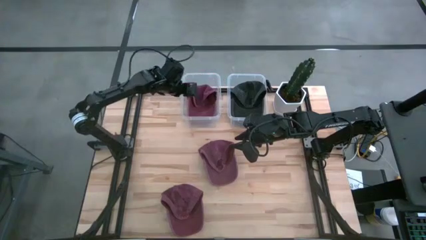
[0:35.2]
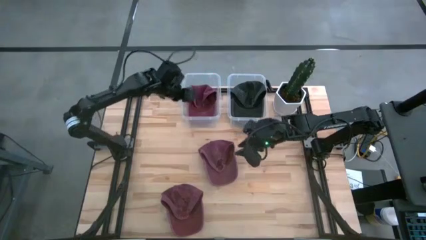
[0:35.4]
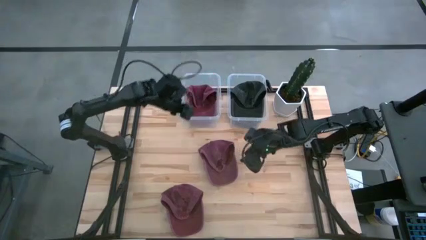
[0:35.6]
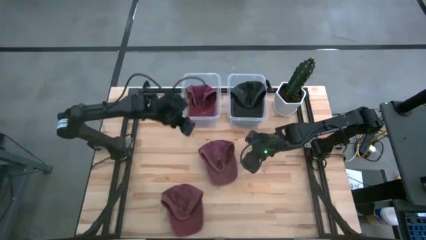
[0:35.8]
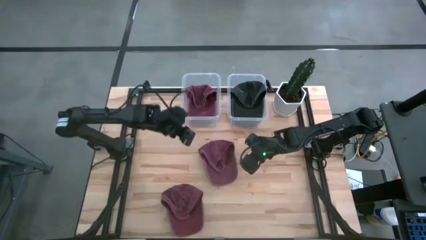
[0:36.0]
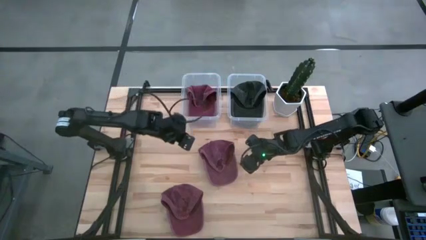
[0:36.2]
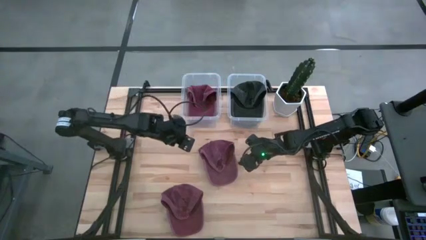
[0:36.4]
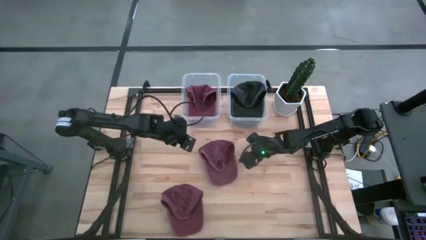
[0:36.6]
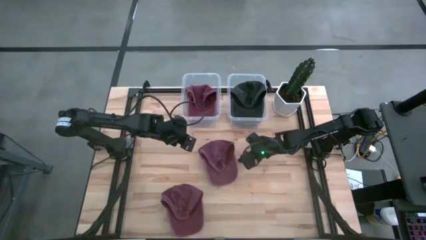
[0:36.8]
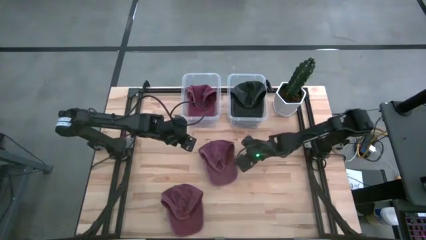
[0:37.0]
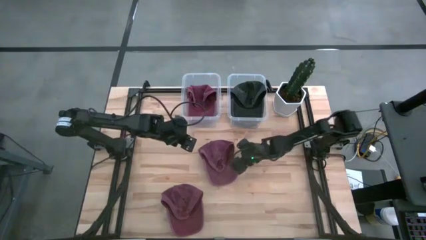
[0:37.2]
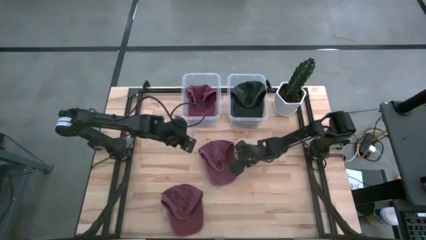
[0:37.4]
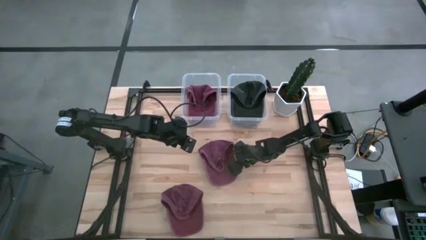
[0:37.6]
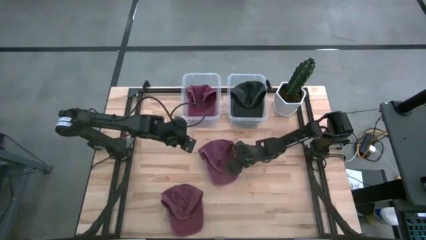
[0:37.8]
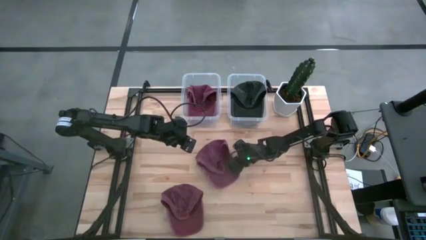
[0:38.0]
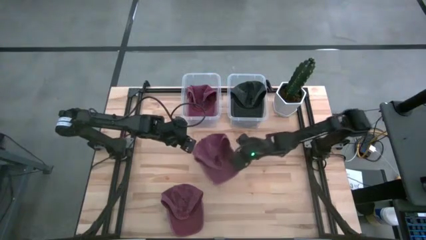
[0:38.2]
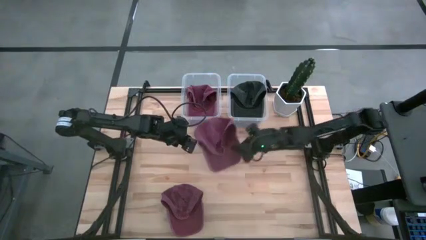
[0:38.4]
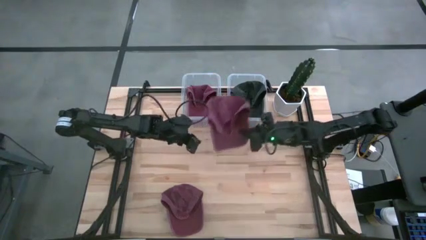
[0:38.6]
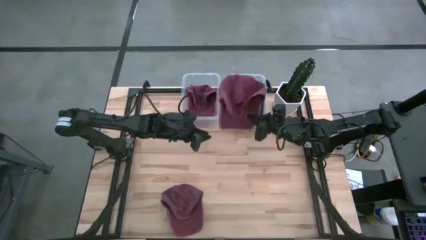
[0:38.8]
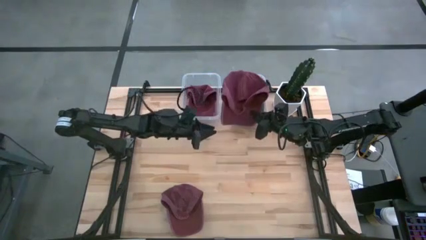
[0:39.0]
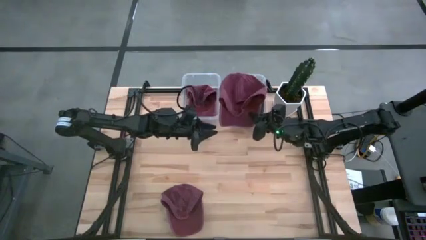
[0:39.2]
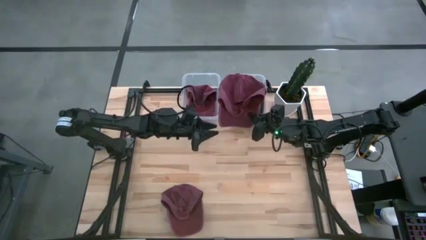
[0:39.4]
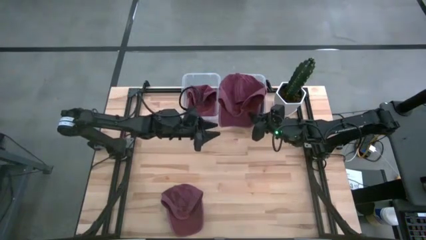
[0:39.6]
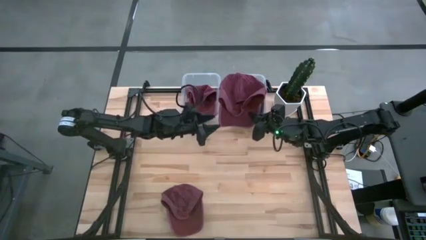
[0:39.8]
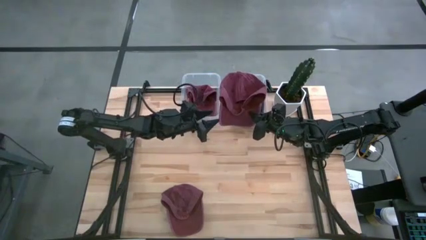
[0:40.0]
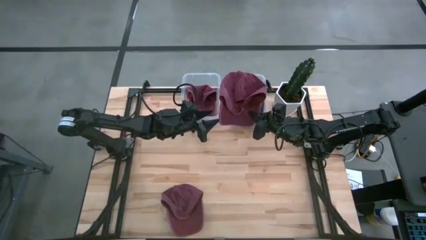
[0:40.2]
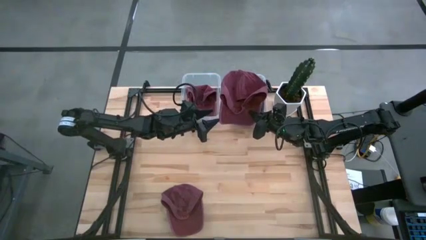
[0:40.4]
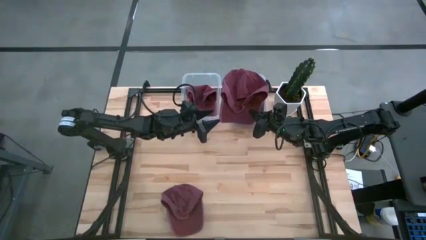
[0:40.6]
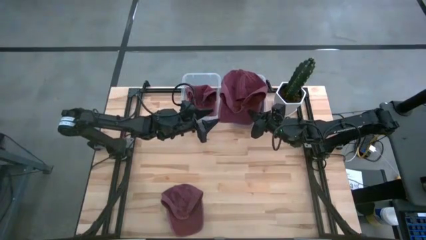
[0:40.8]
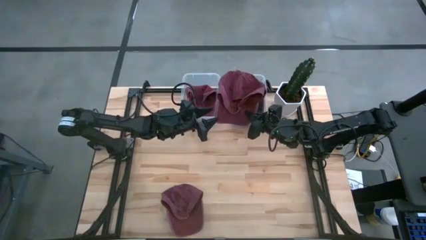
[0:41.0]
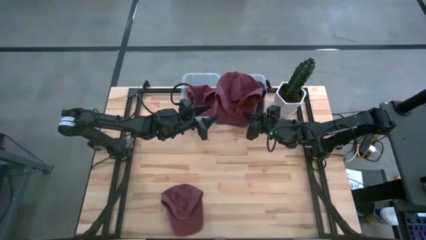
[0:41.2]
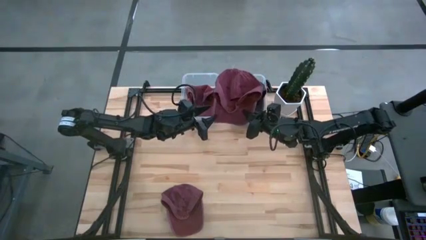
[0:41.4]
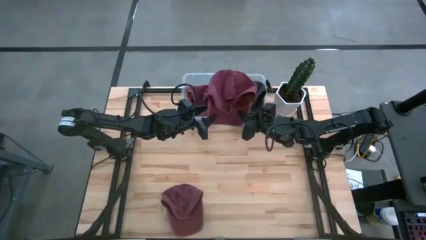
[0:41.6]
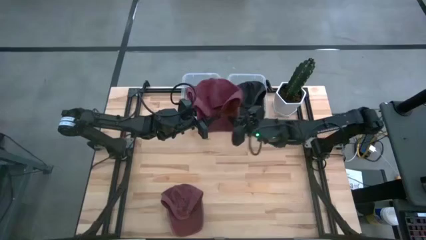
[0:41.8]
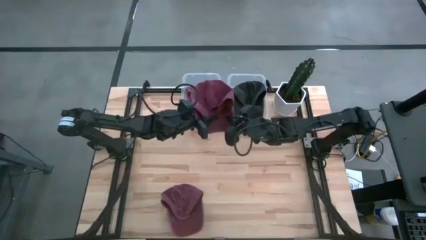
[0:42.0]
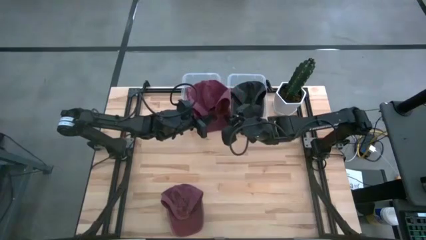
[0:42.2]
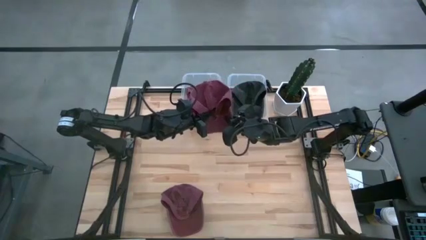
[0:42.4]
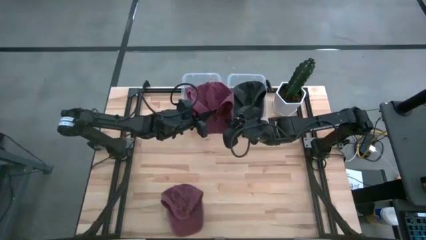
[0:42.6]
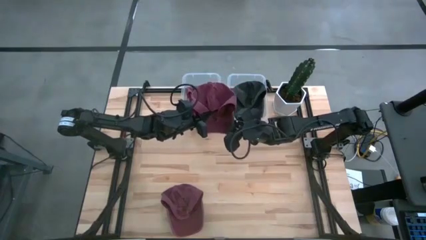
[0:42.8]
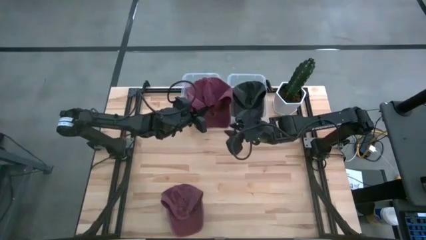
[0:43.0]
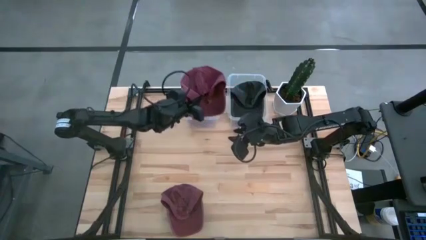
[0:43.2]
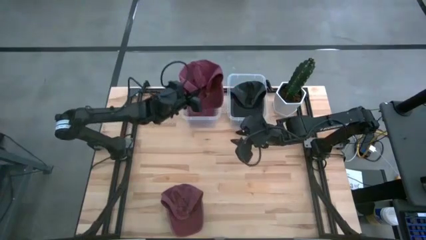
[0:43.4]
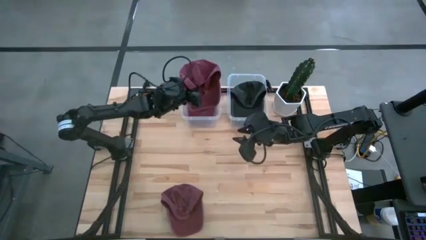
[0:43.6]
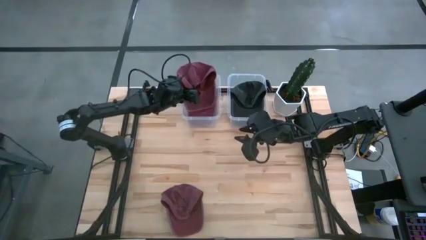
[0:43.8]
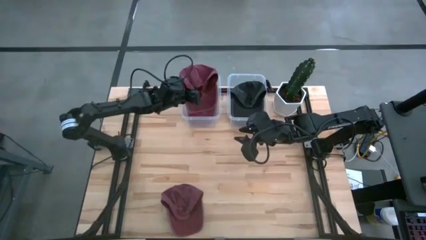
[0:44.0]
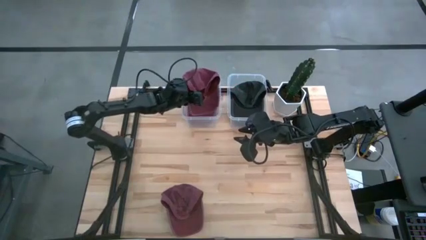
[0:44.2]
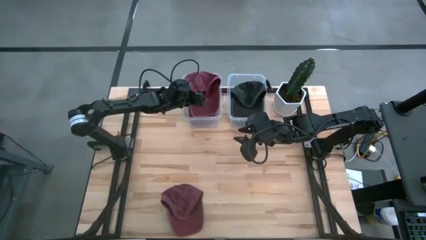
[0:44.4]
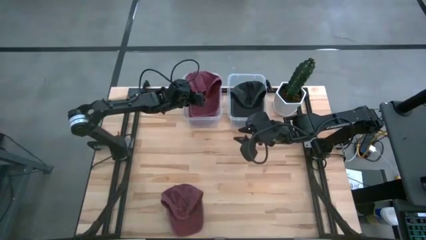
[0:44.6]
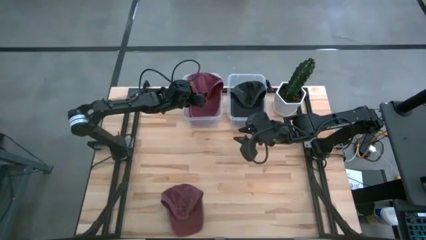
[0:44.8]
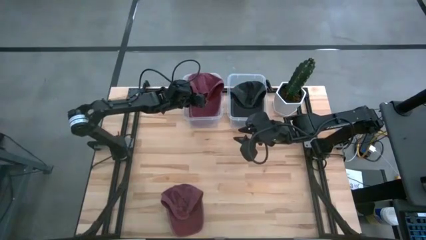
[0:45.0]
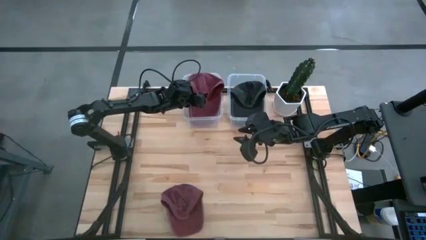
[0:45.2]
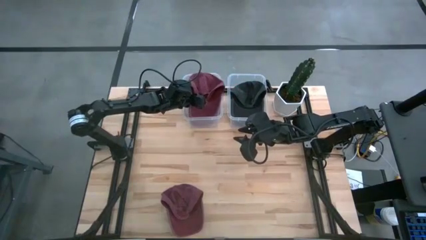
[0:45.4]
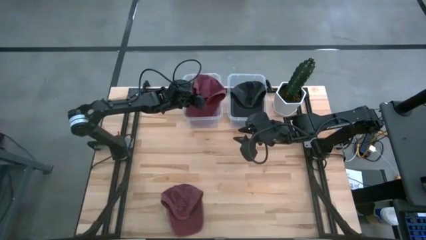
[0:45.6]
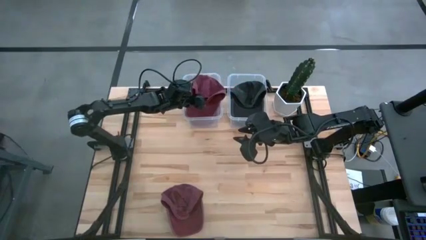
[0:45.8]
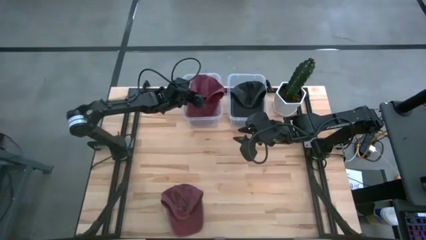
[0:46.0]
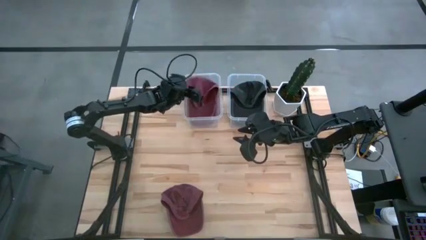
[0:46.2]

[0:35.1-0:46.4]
Task: Pick & Place hat
Put the top red cap into the left transparent bin
